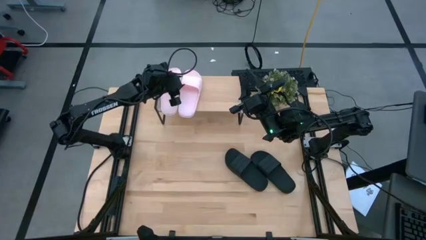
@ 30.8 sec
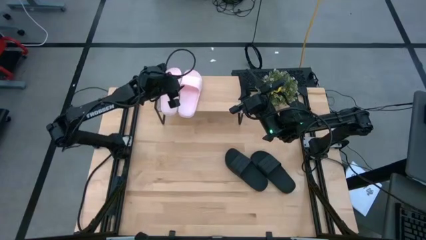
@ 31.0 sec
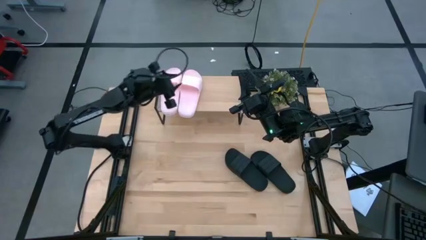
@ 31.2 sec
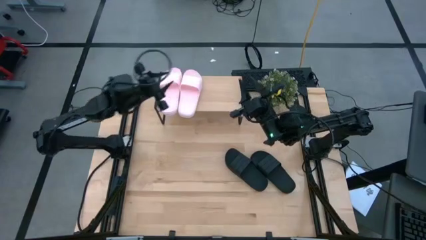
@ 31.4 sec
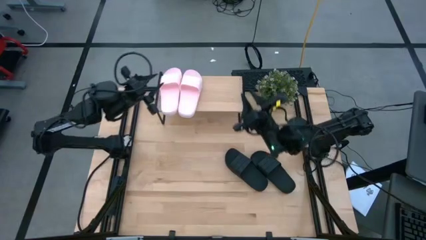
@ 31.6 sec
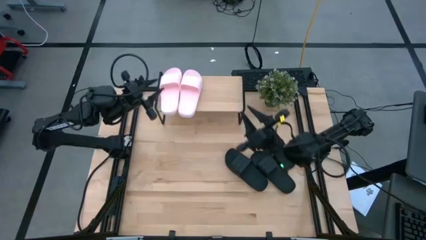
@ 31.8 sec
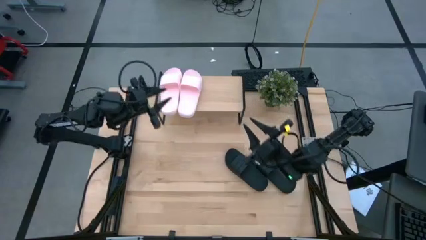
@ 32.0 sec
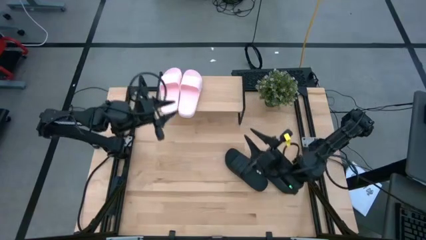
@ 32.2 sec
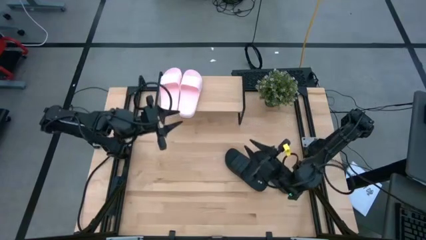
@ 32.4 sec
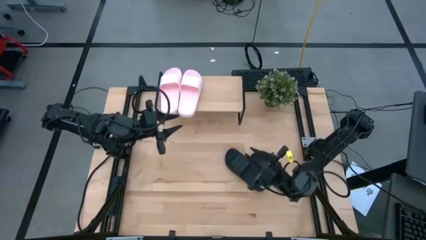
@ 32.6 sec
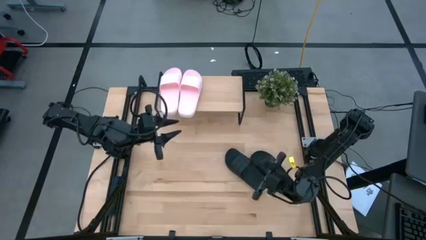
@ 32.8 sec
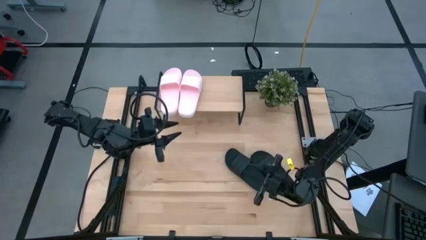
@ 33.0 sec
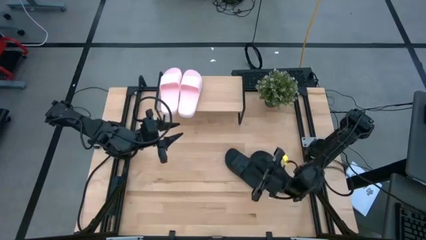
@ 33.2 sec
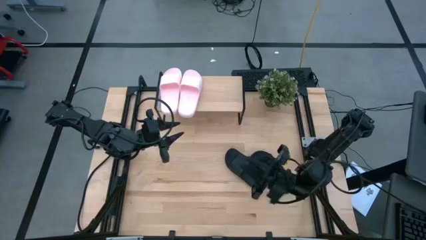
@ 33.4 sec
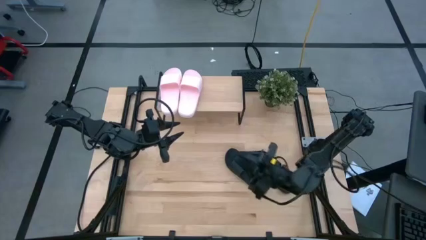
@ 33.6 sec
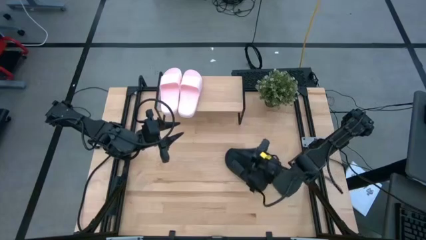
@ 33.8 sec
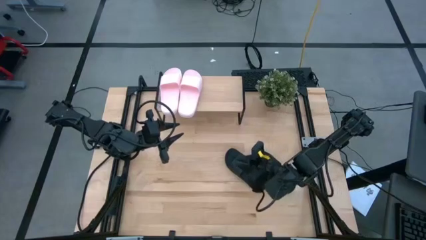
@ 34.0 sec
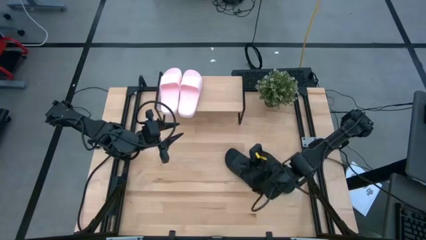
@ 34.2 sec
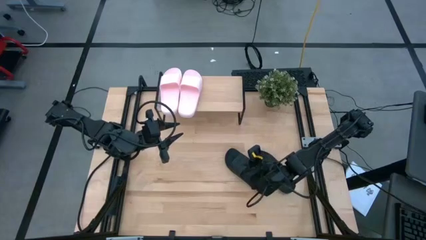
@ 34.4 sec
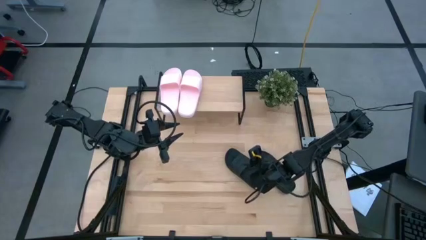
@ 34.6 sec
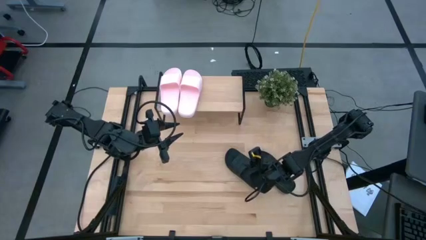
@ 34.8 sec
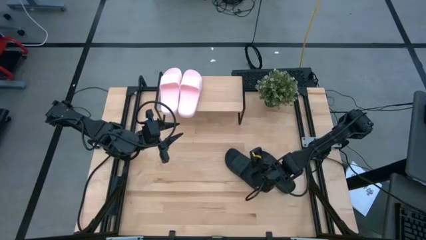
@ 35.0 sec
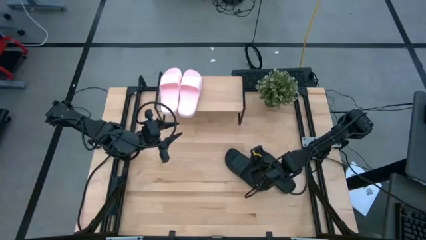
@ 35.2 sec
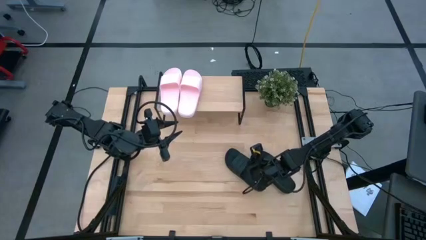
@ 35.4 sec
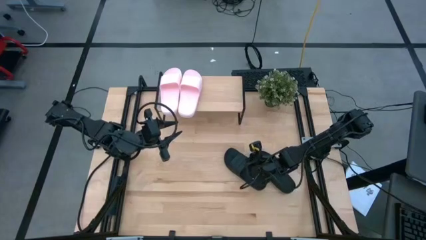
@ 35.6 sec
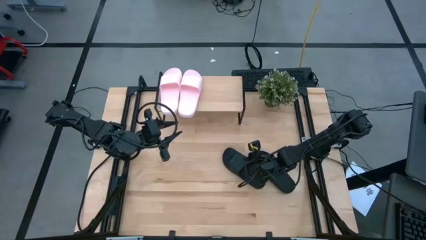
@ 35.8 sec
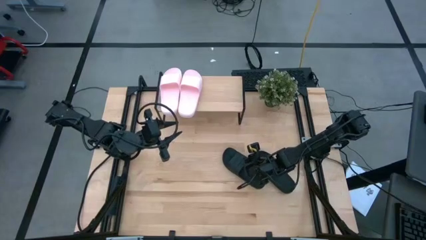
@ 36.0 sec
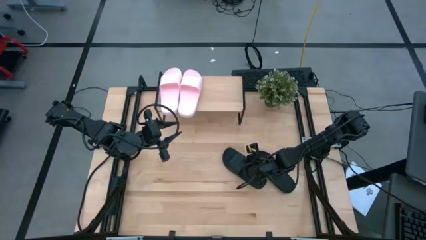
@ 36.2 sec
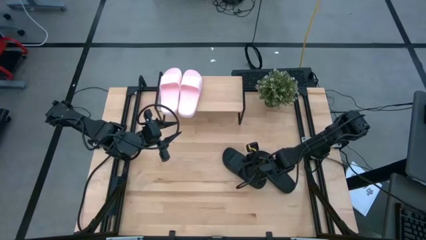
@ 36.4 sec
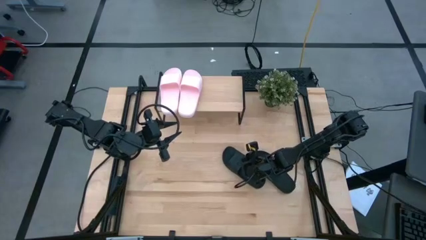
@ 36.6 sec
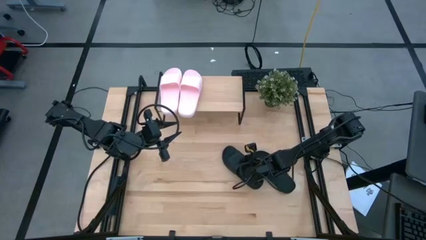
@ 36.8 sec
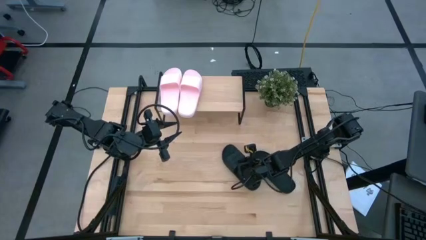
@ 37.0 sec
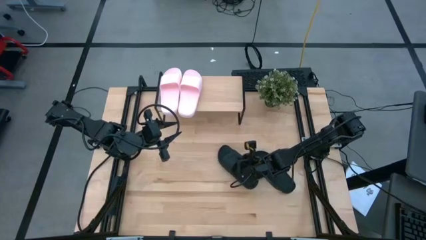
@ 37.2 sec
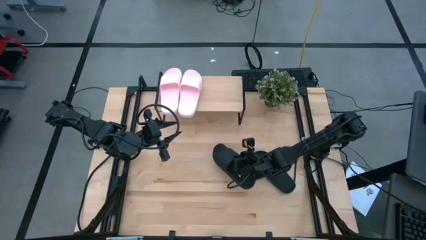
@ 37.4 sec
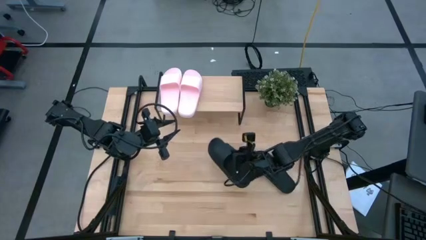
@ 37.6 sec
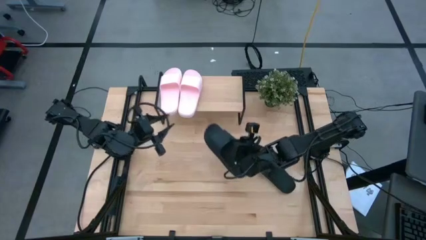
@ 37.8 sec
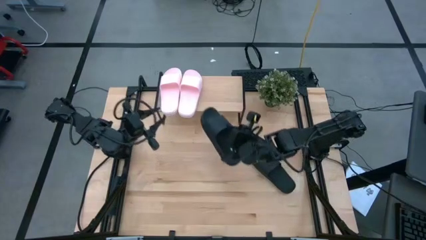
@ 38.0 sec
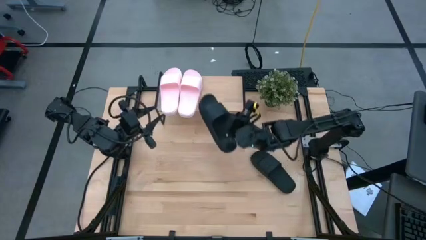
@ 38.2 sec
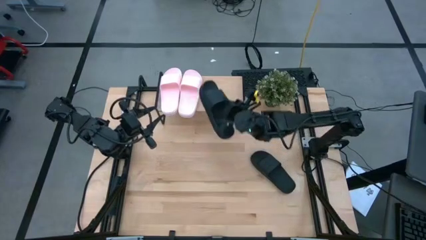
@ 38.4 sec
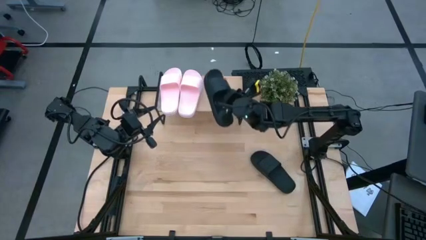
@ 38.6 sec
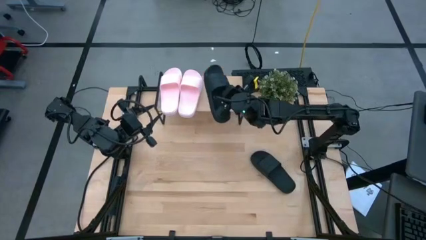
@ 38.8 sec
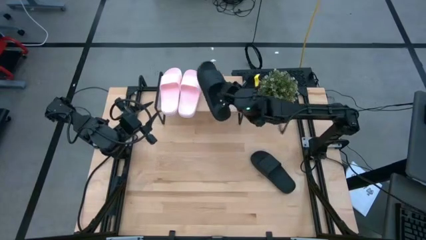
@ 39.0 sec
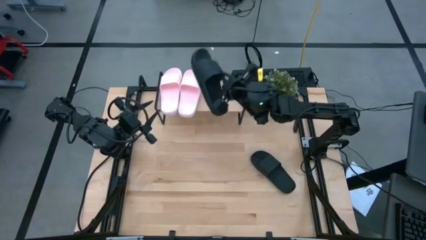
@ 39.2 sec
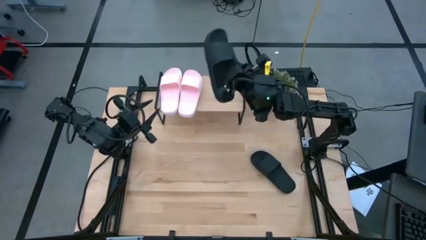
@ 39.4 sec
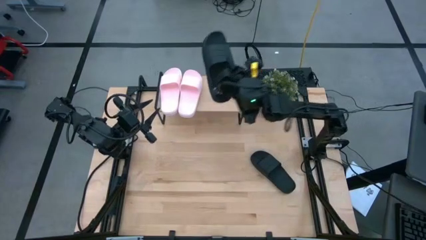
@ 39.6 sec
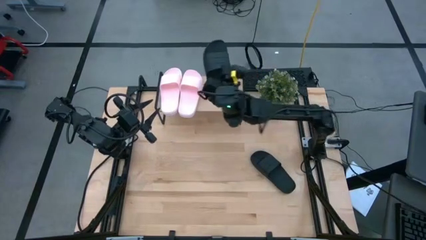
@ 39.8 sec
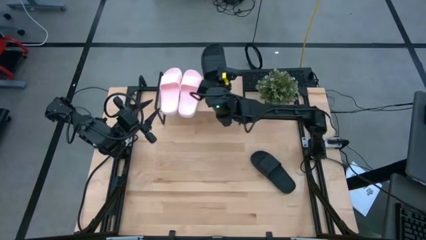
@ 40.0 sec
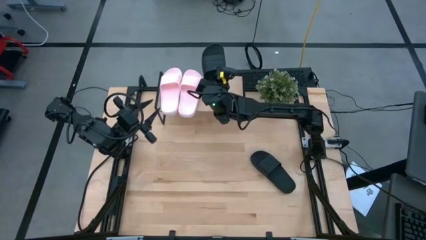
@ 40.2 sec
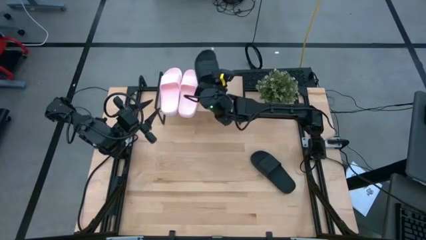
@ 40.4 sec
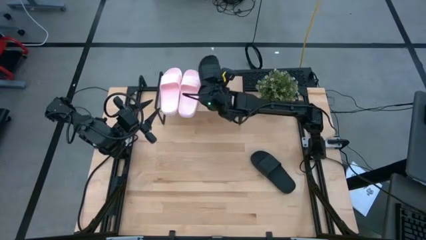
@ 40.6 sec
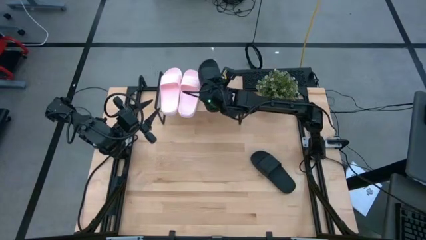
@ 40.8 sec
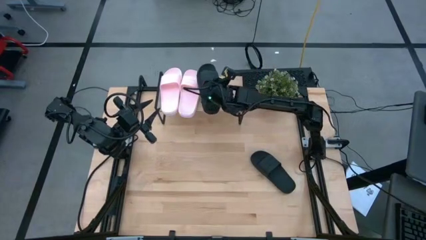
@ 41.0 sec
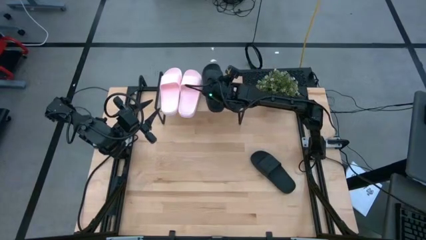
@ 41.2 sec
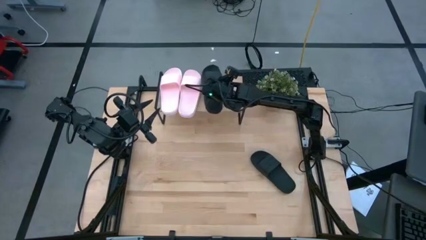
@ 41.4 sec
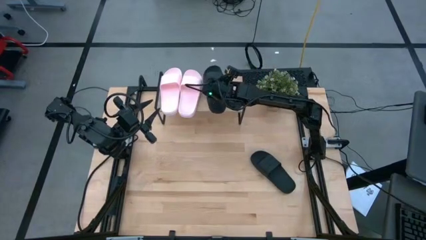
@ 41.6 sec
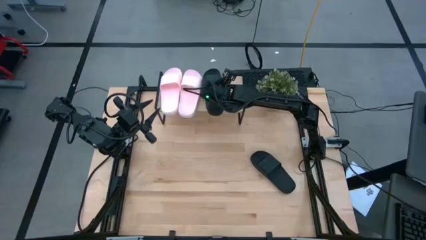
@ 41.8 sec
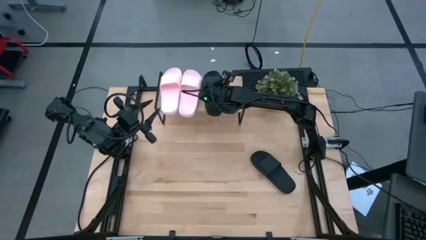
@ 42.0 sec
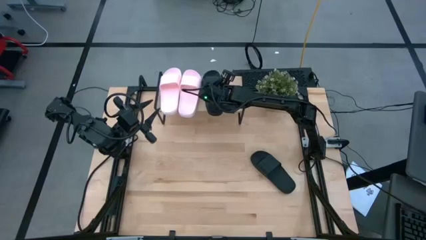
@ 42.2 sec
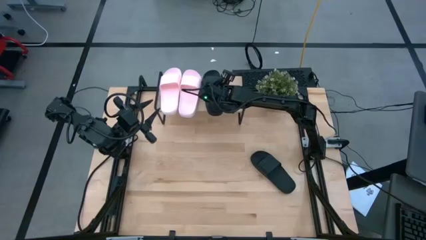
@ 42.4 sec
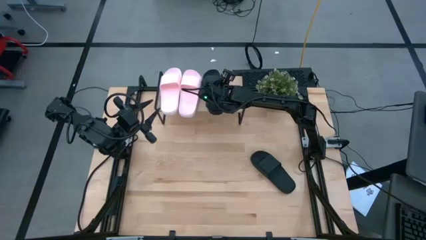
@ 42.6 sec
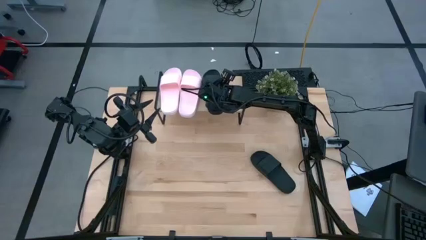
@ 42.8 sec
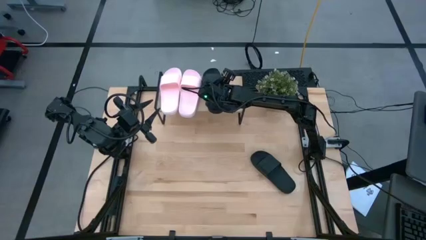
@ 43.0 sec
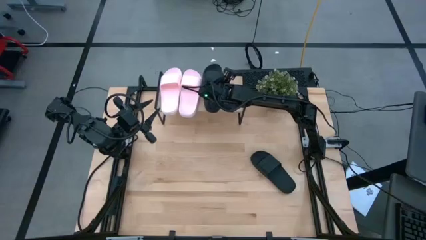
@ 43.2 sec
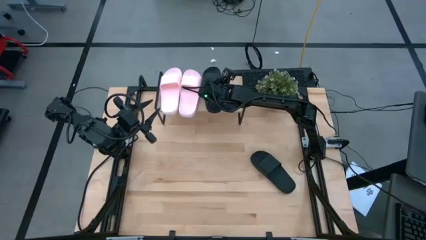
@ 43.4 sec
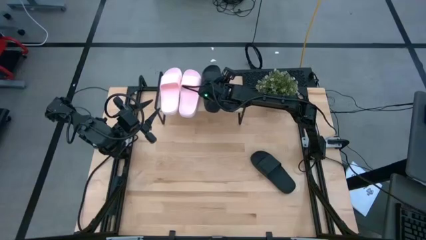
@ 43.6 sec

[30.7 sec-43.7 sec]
Task: Pick and place slides into the shelf
Put the left black slide on the shelf

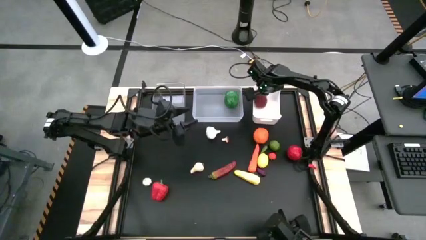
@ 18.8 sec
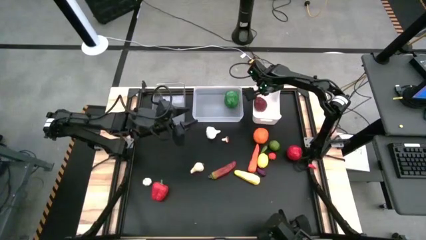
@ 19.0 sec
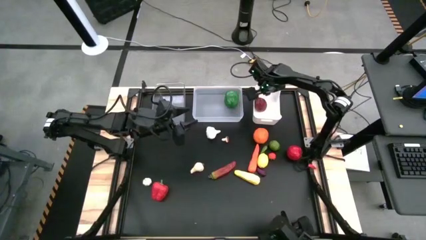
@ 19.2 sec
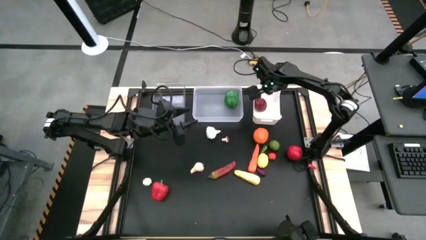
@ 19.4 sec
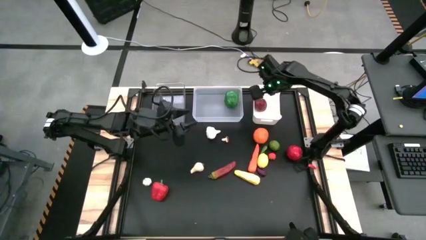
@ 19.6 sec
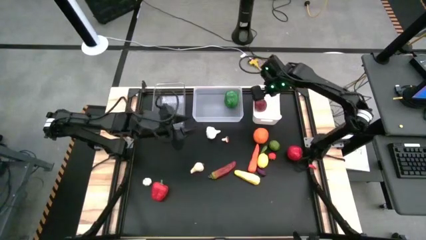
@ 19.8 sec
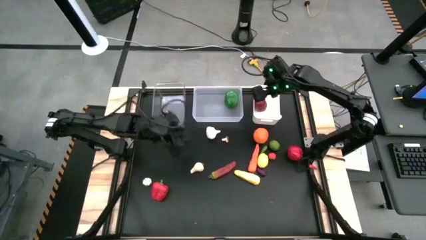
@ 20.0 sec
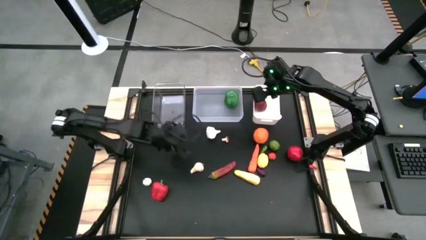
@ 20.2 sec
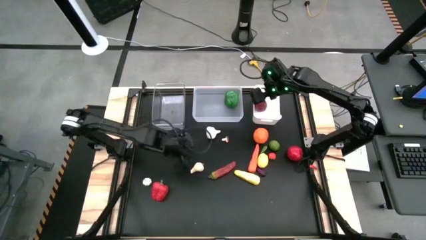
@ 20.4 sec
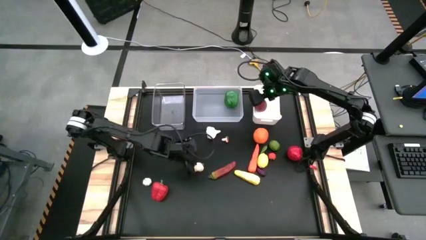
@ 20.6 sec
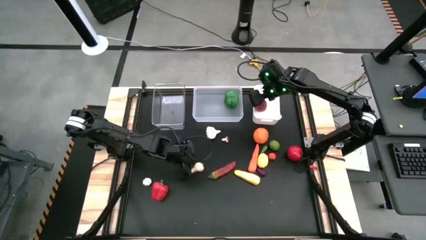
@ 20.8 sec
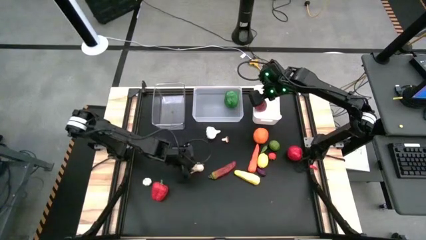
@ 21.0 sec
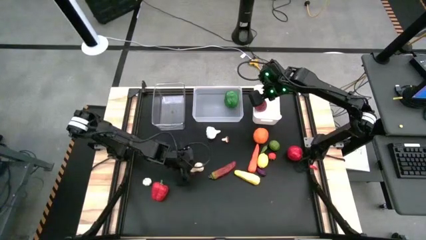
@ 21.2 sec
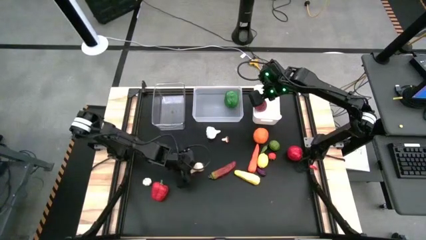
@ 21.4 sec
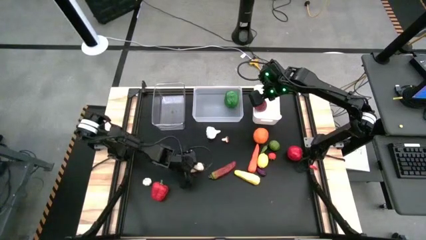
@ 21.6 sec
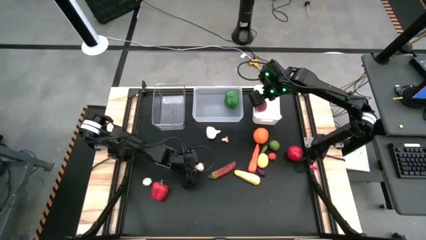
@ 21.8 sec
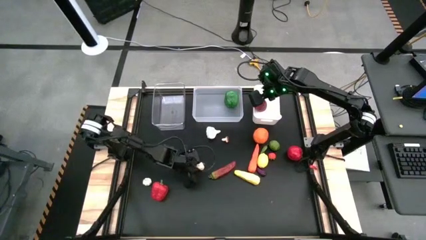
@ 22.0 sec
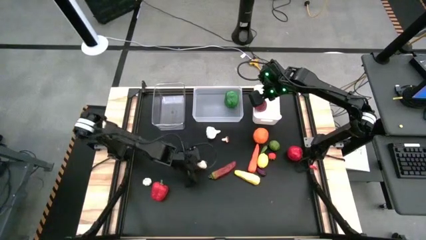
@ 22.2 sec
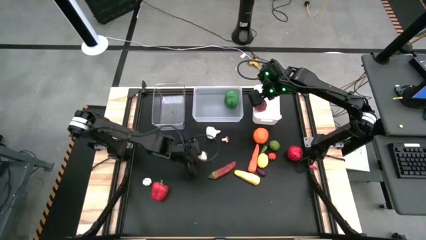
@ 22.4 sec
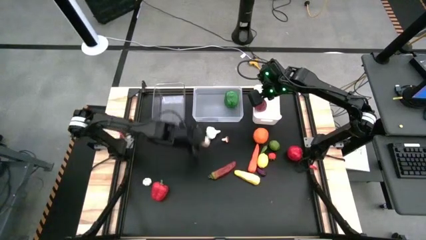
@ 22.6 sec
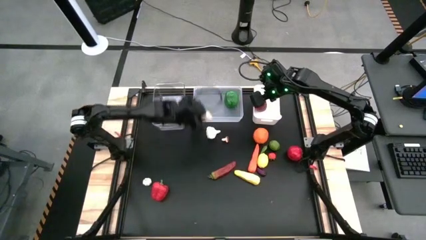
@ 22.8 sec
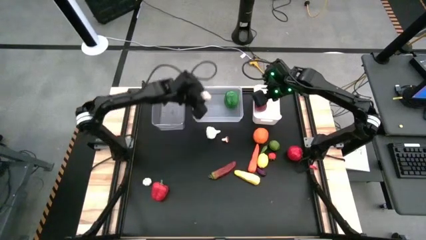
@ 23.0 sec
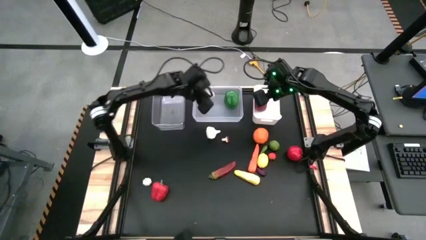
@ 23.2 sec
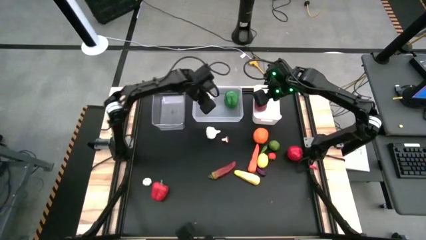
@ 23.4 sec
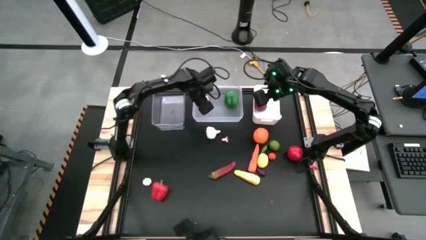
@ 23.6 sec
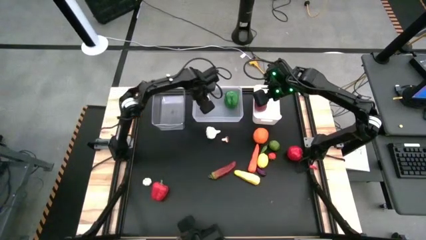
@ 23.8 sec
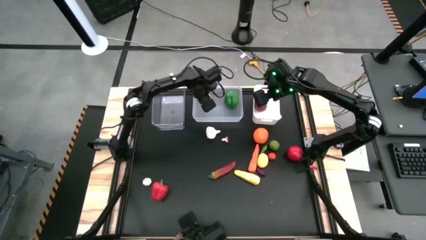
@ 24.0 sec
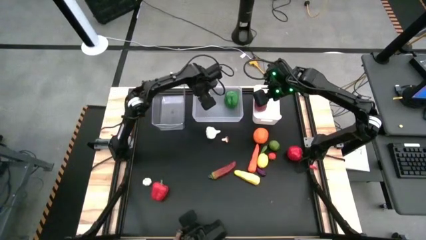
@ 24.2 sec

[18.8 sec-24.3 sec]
Task: Sort produce into baskets
Put the middle white garlic into the transparent bin
